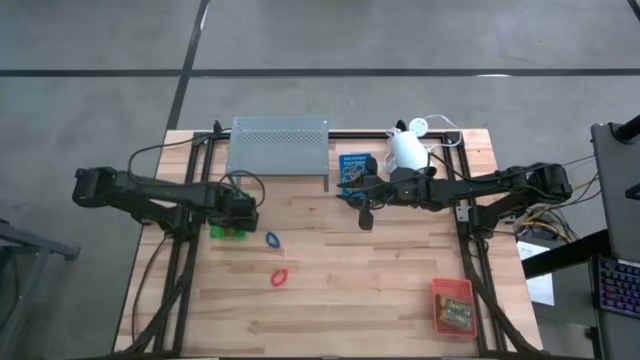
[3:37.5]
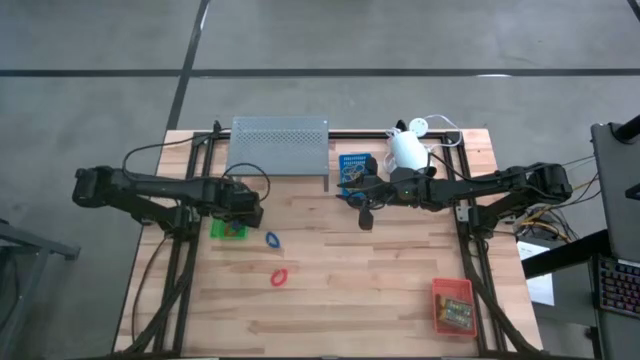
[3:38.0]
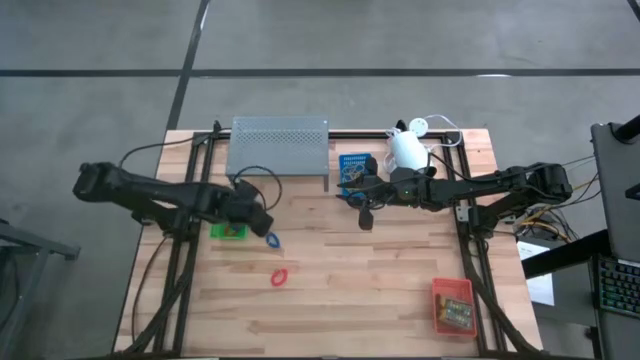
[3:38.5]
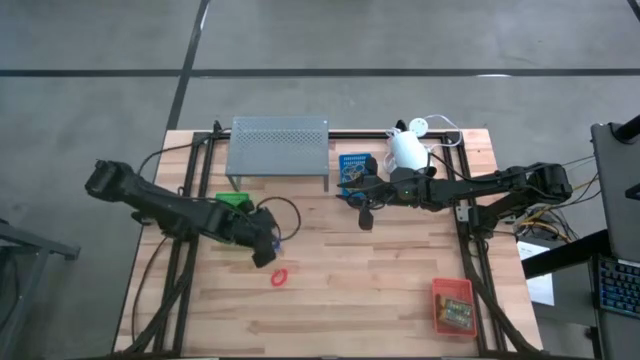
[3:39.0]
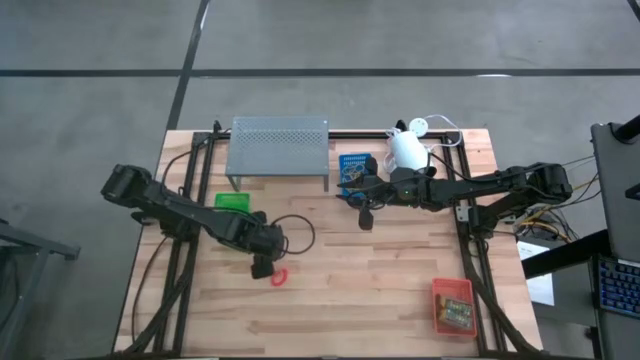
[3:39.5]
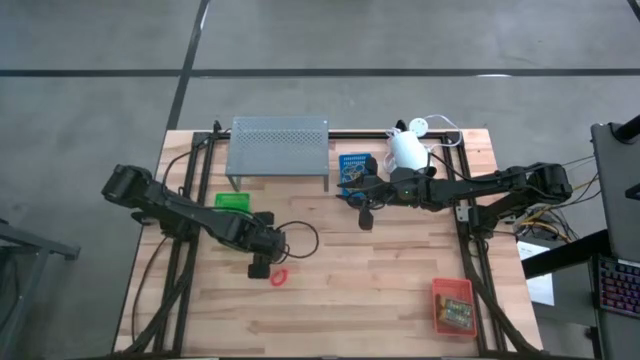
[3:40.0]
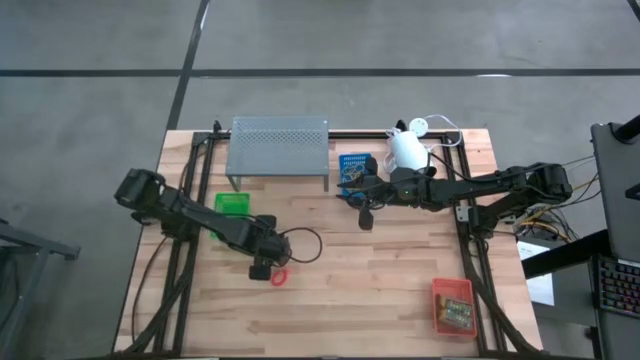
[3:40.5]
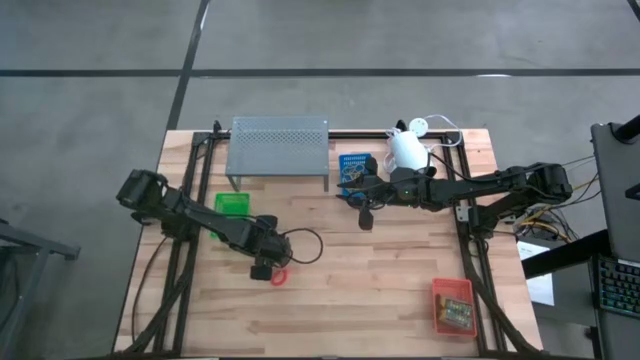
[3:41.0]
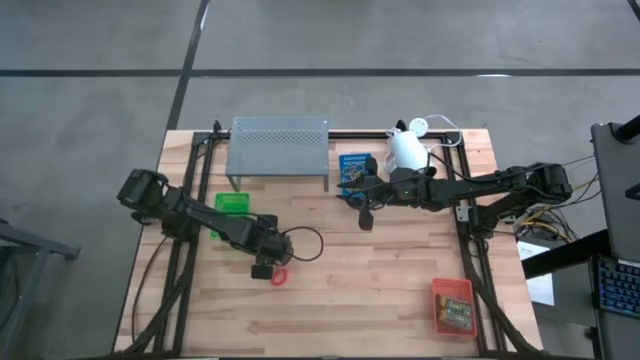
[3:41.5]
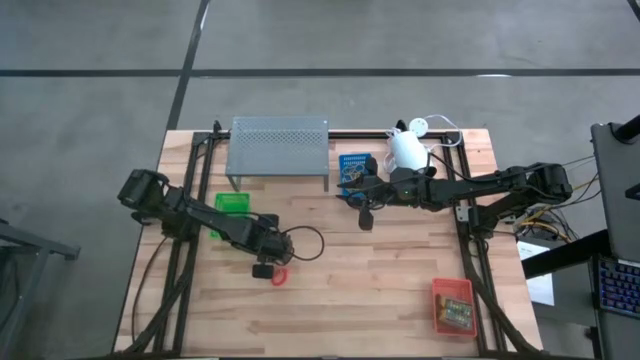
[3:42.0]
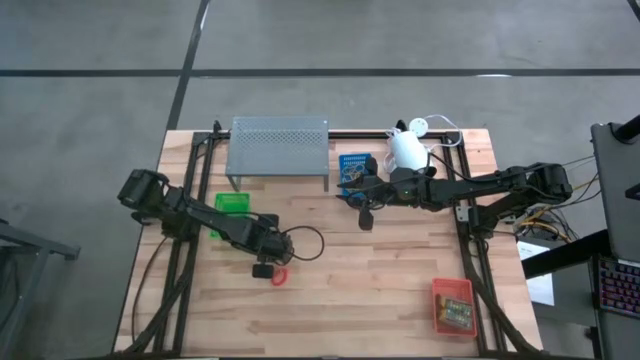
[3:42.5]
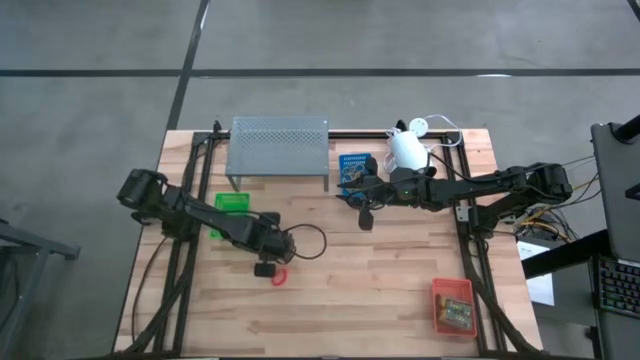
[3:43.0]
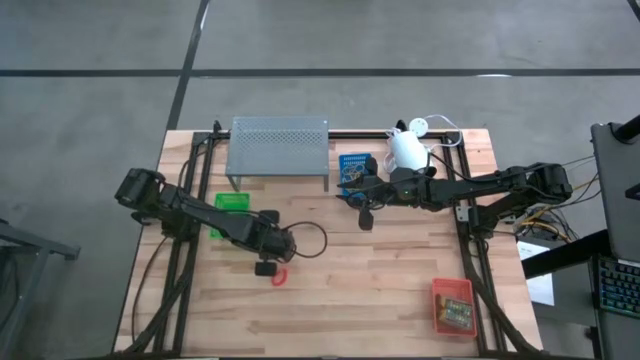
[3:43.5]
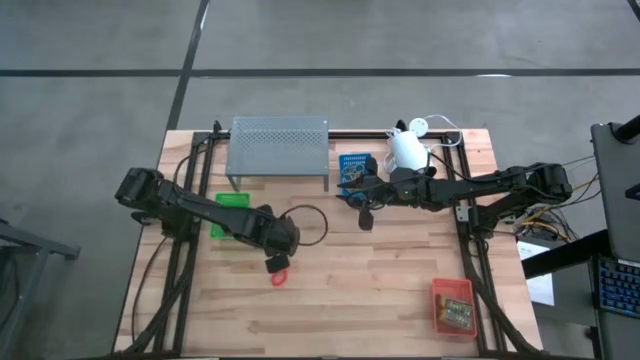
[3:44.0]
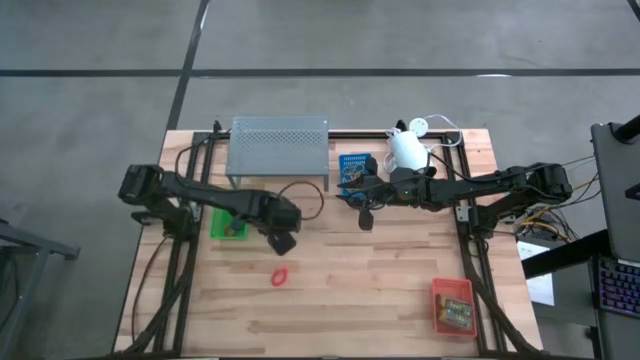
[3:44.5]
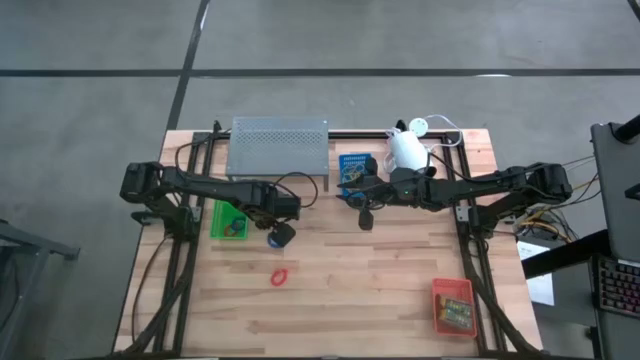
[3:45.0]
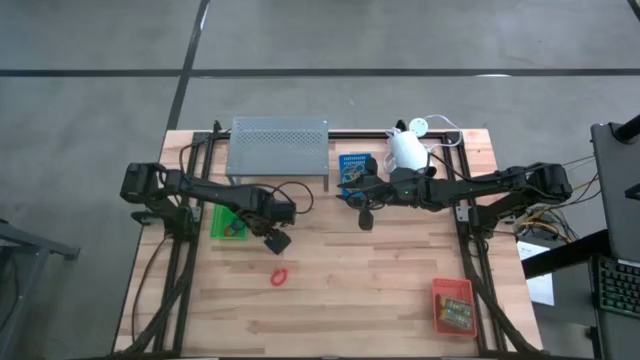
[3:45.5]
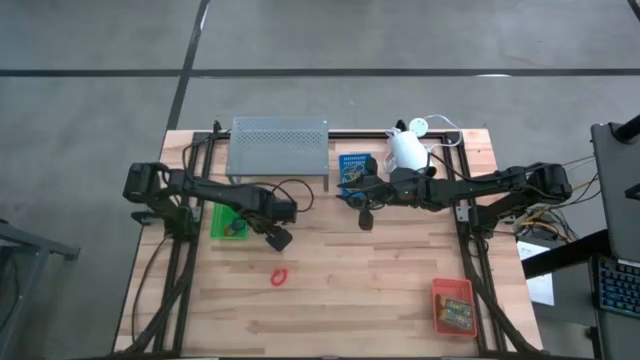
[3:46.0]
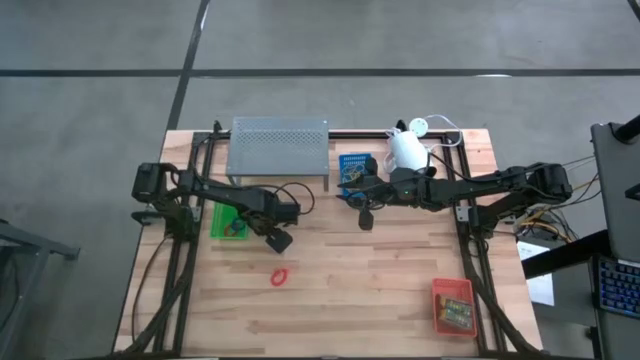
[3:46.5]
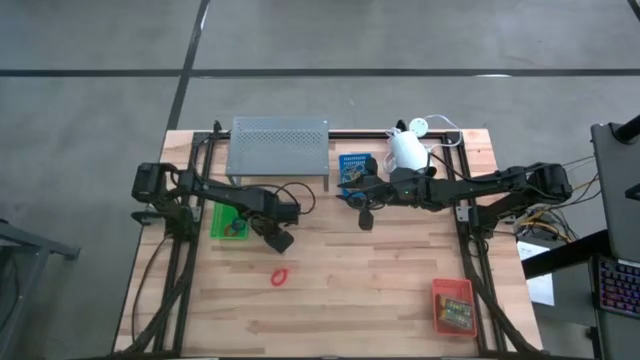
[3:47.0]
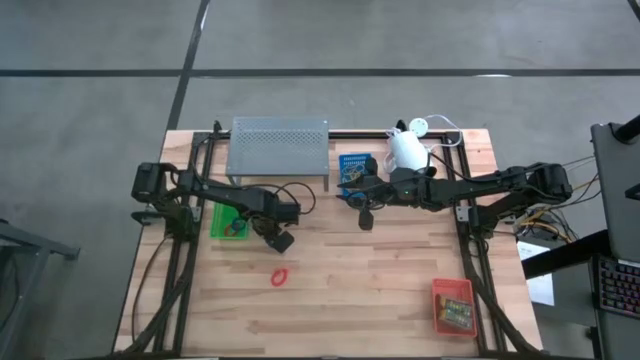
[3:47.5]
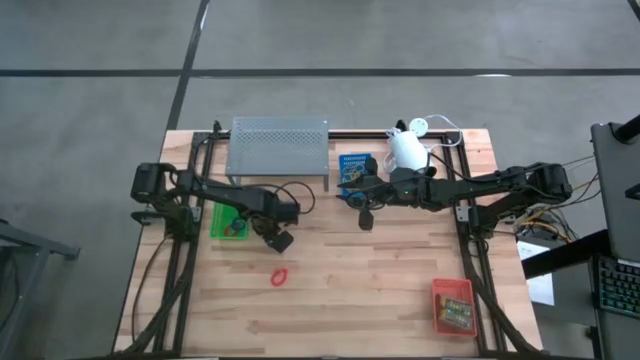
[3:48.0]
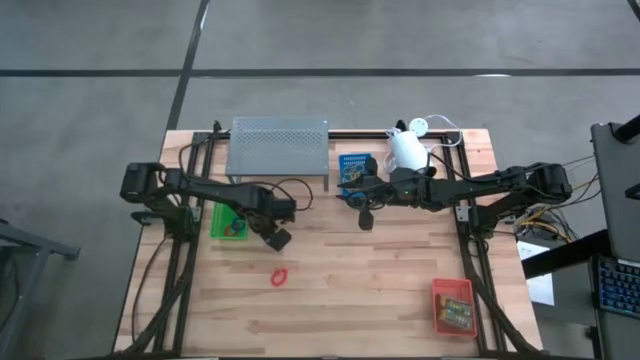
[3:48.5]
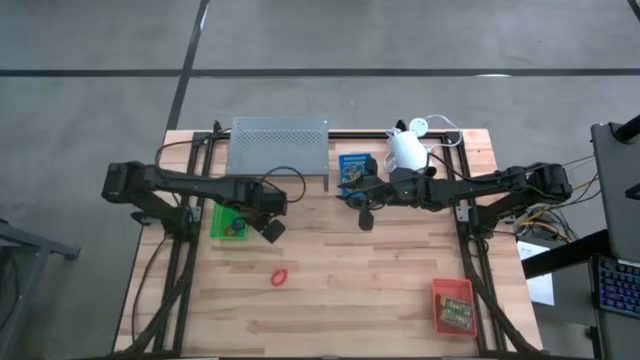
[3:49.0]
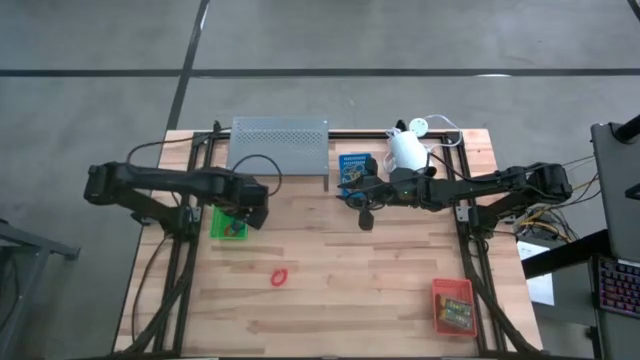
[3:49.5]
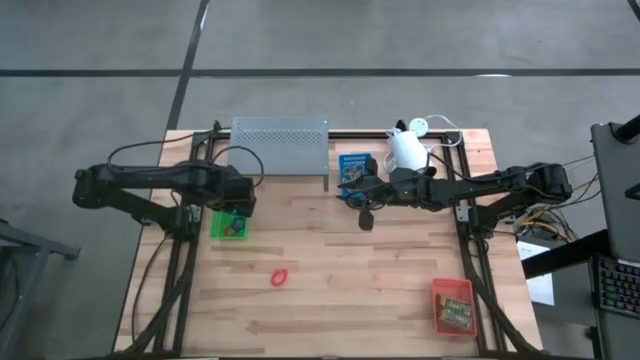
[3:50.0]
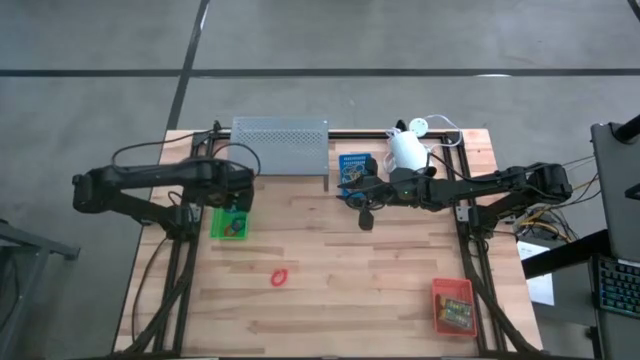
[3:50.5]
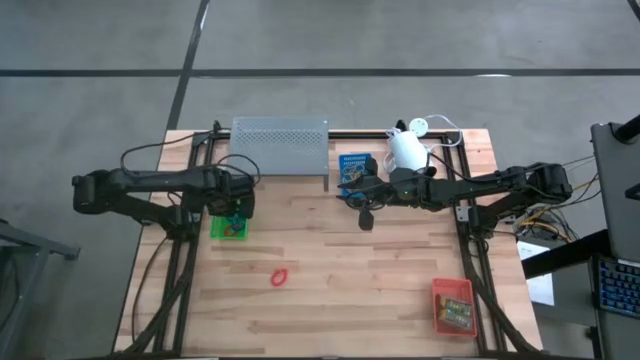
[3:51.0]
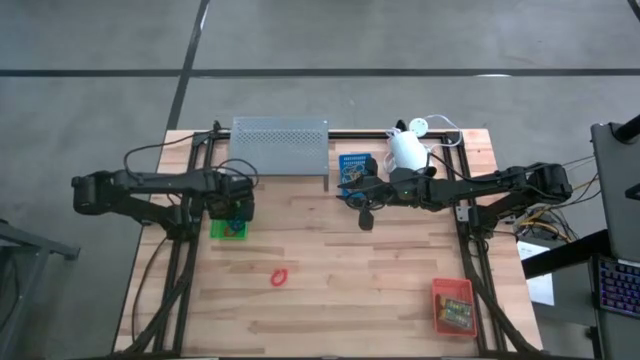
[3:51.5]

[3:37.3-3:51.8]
Task: Pick & Place Office Desk Supplies
Put the blue spring rubber band into the green bin

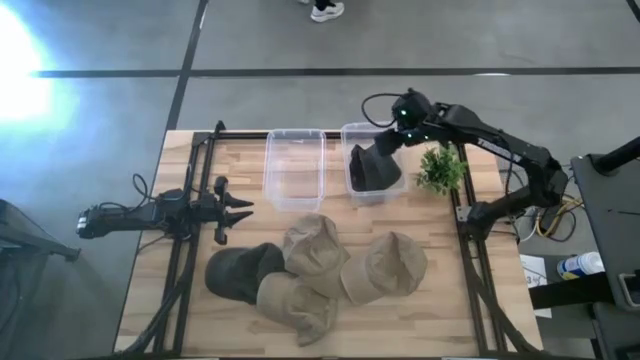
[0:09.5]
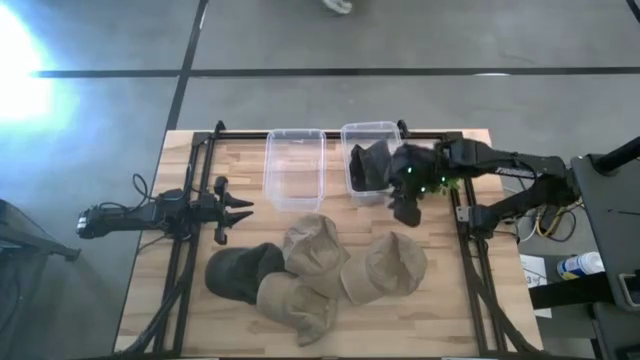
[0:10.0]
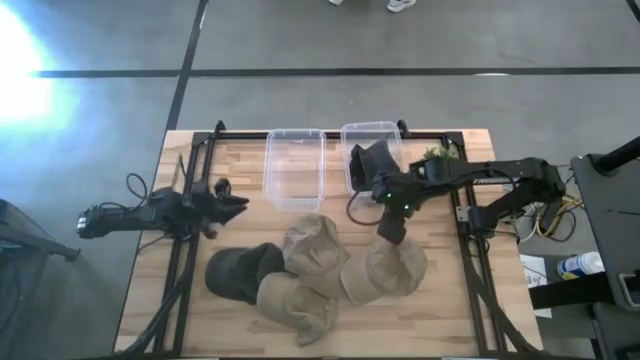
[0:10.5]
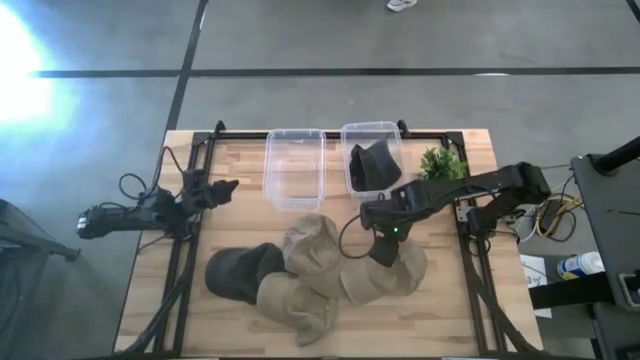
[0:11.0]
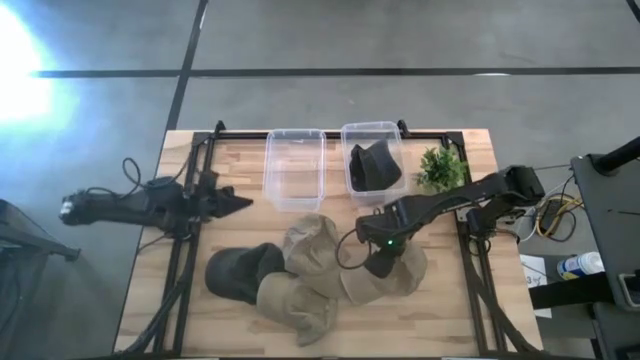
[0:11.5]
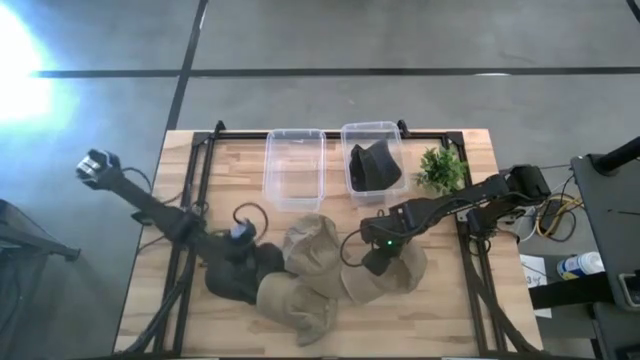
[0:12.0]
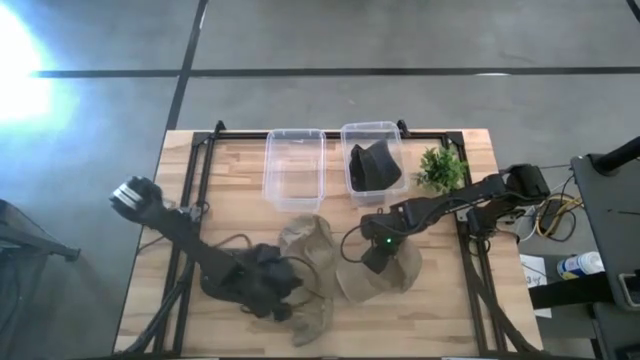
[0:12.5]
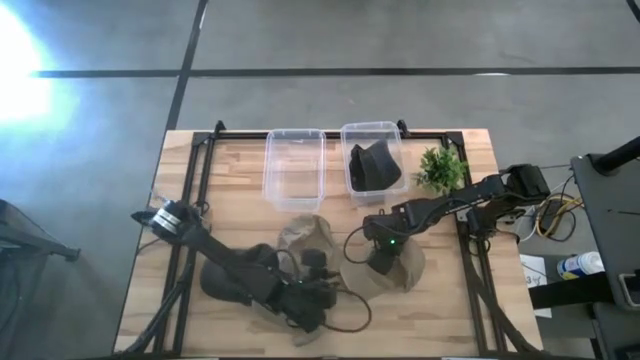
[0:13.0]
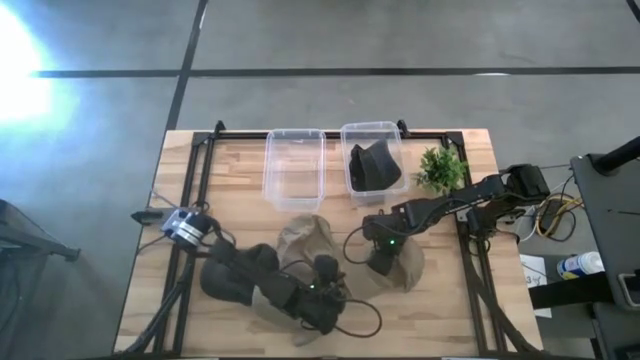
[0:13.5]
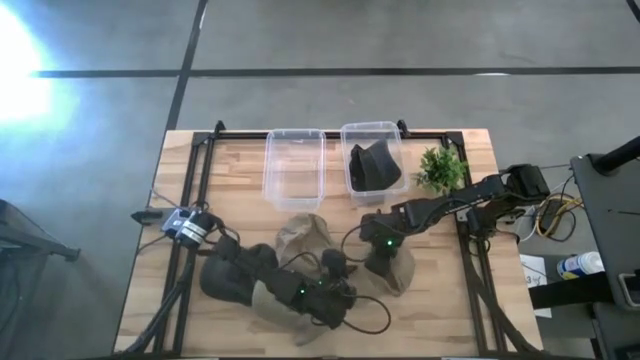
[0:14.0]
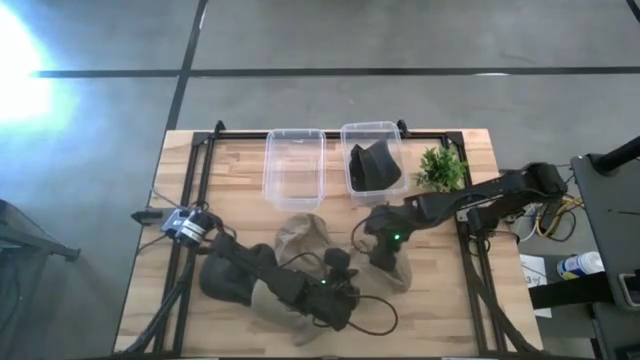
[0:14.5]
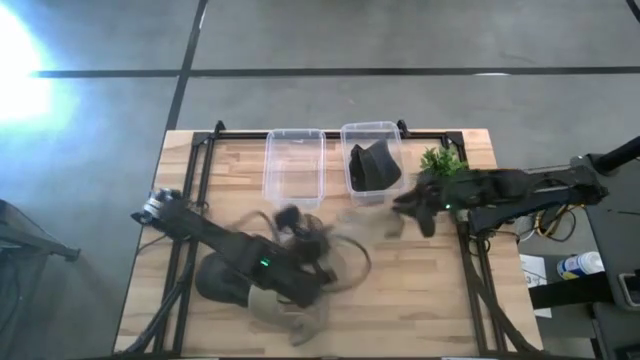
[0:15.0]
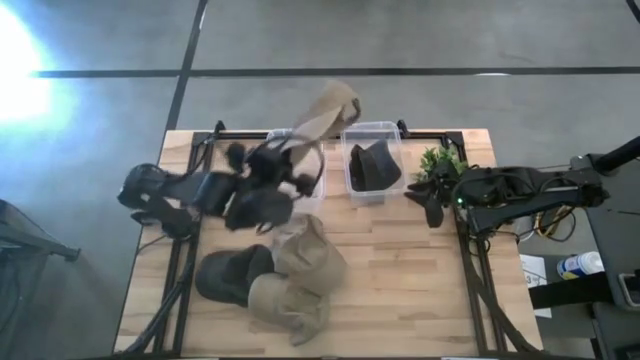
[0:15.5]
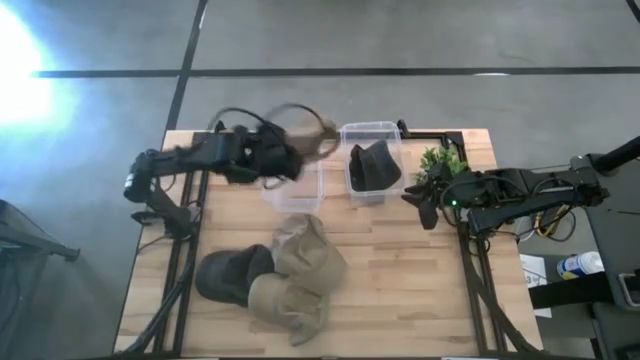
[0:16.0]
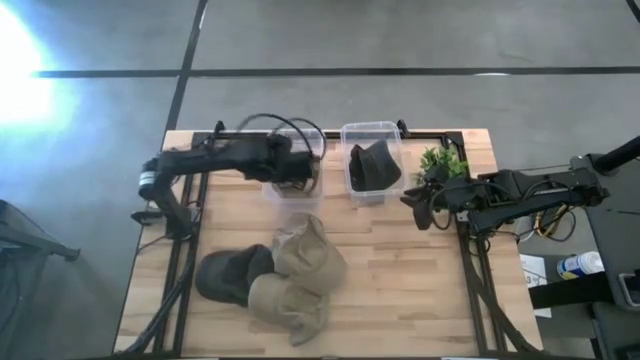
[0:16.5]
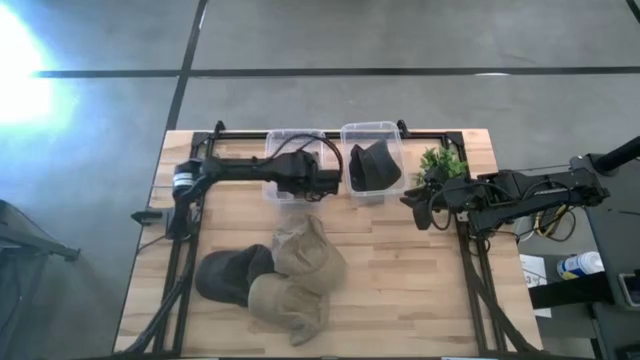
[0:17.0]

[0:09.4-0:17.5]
Task: Pick & Place hat
Put the right brown cap into the left transparent bin
